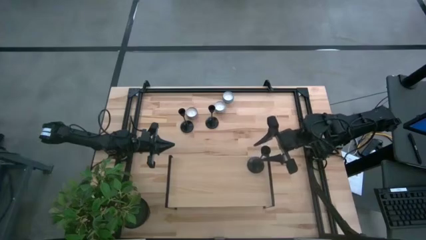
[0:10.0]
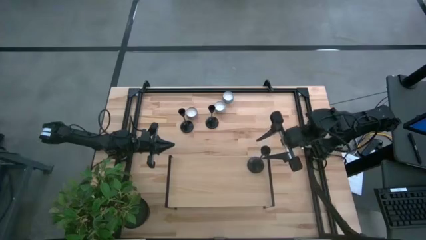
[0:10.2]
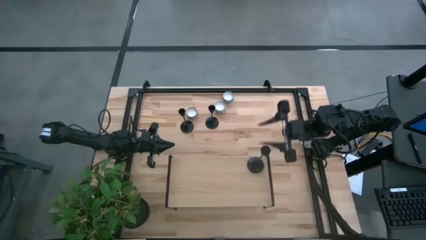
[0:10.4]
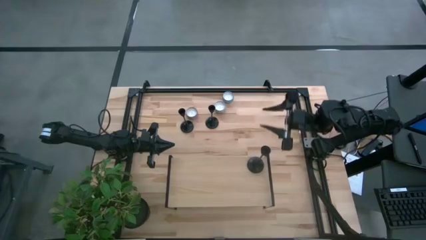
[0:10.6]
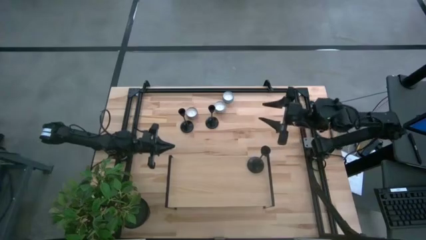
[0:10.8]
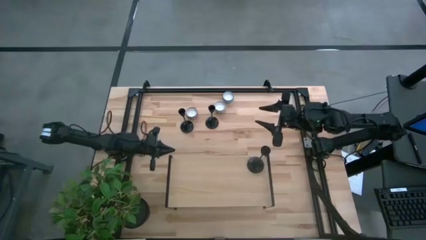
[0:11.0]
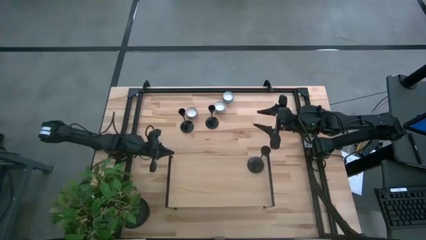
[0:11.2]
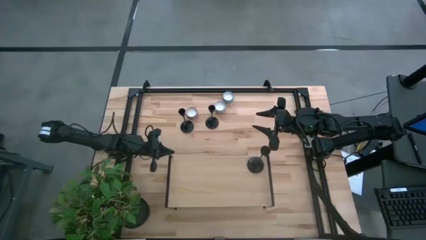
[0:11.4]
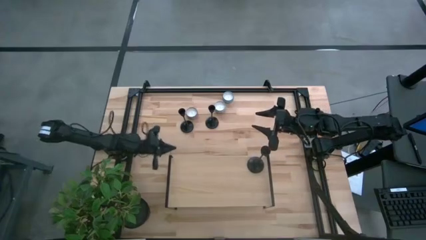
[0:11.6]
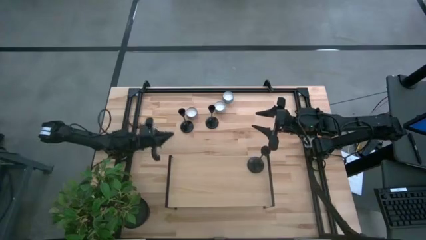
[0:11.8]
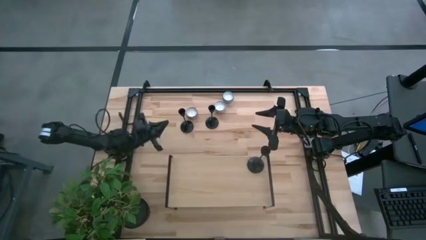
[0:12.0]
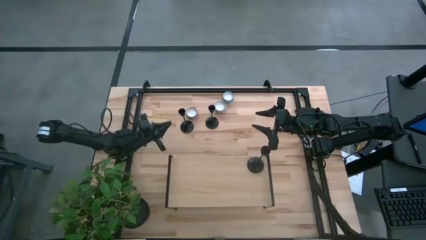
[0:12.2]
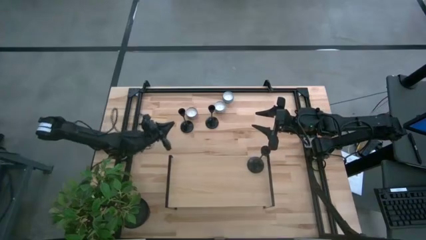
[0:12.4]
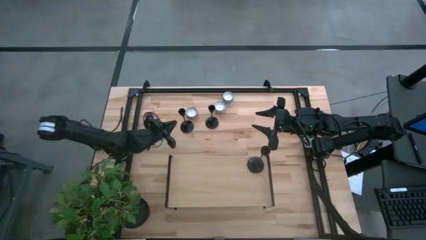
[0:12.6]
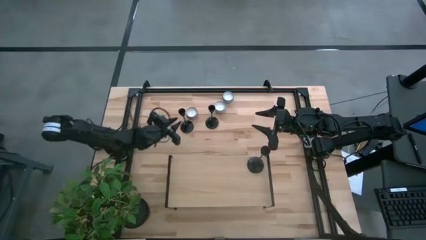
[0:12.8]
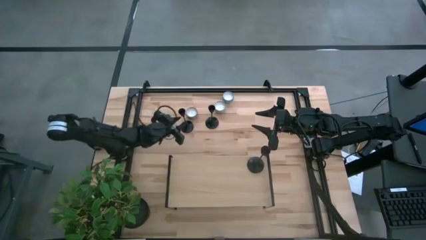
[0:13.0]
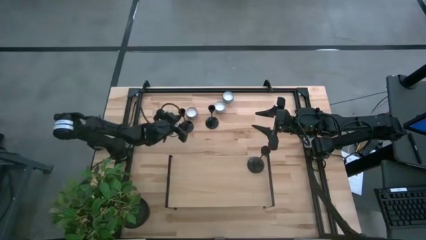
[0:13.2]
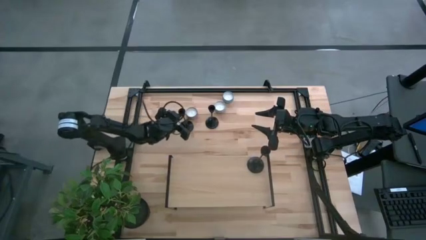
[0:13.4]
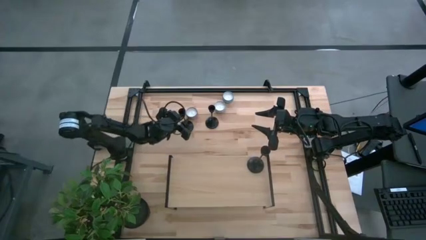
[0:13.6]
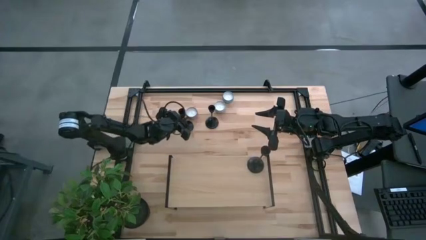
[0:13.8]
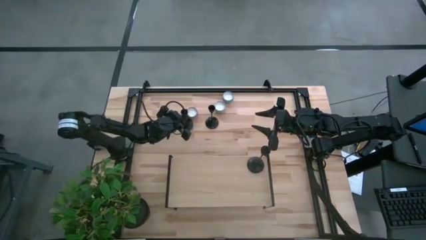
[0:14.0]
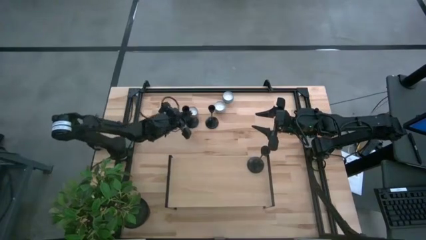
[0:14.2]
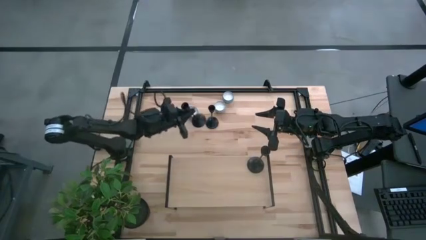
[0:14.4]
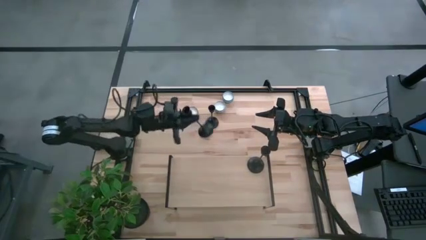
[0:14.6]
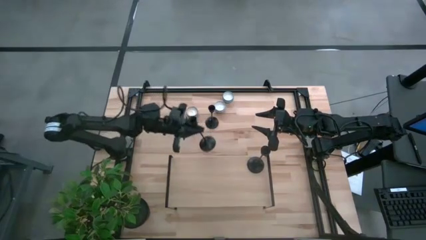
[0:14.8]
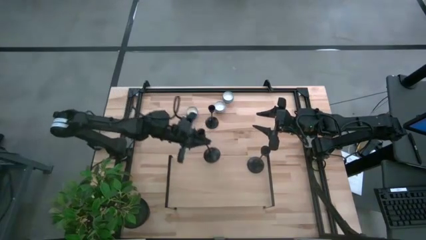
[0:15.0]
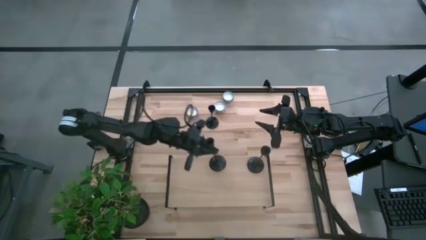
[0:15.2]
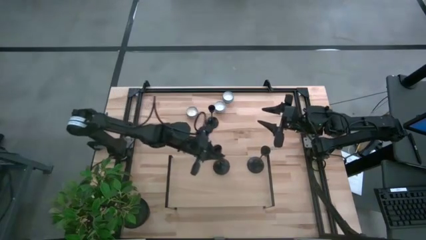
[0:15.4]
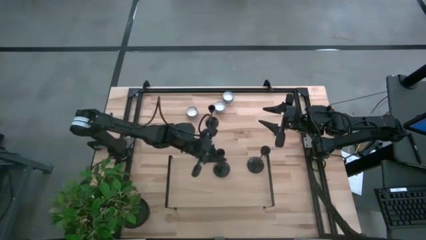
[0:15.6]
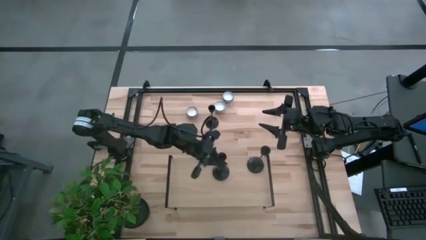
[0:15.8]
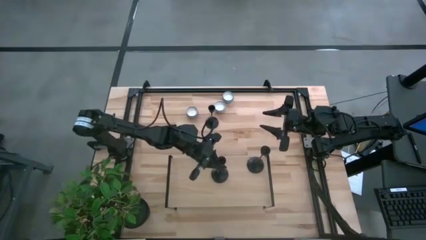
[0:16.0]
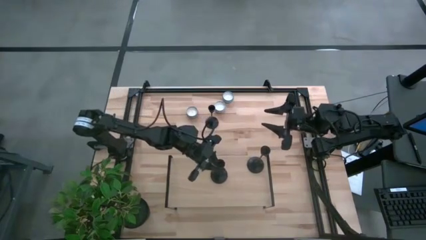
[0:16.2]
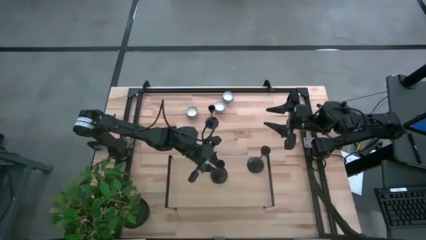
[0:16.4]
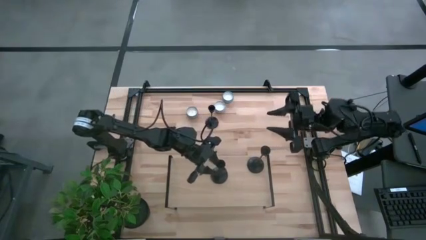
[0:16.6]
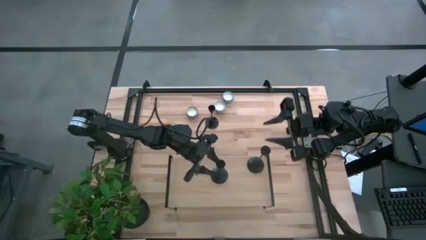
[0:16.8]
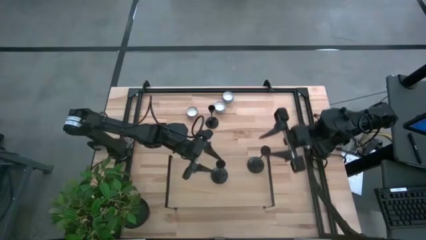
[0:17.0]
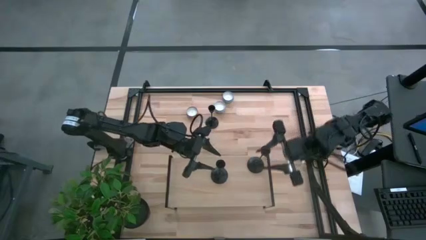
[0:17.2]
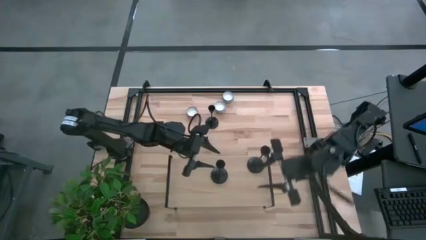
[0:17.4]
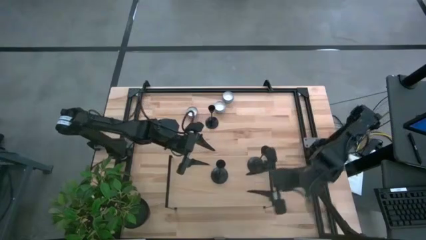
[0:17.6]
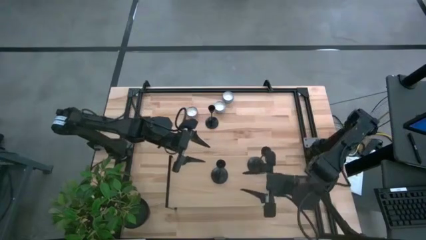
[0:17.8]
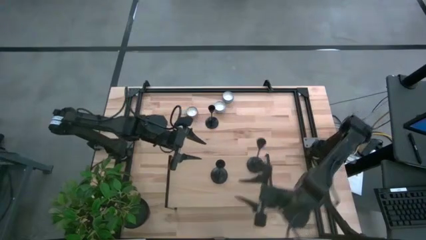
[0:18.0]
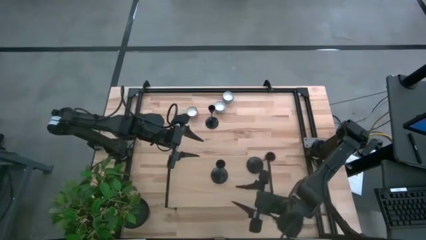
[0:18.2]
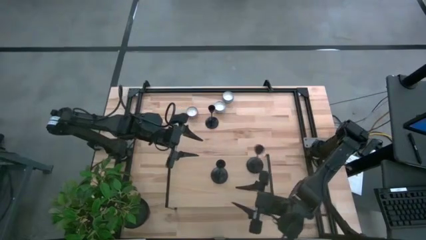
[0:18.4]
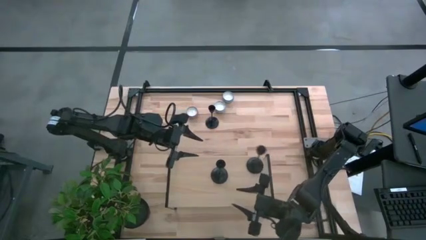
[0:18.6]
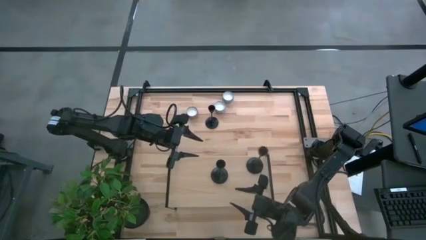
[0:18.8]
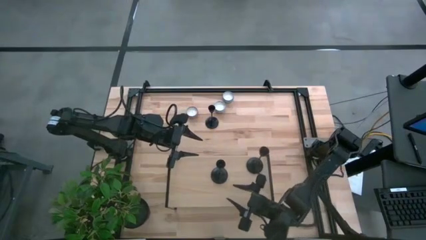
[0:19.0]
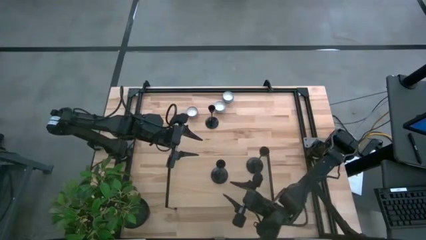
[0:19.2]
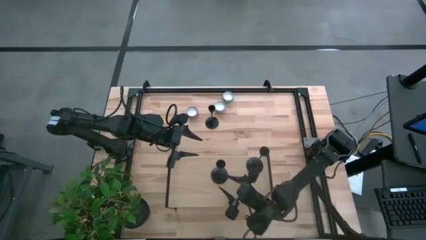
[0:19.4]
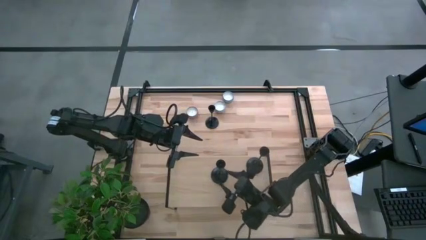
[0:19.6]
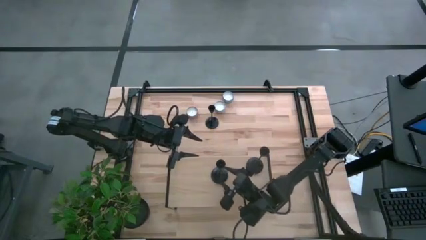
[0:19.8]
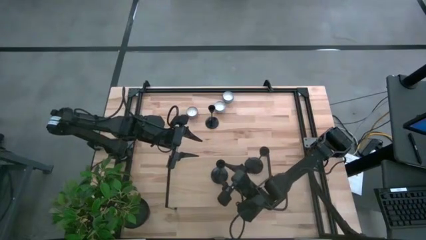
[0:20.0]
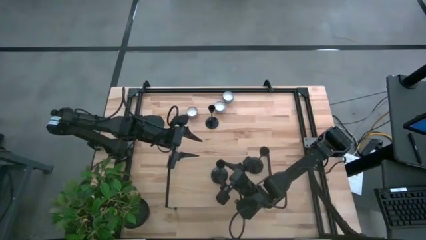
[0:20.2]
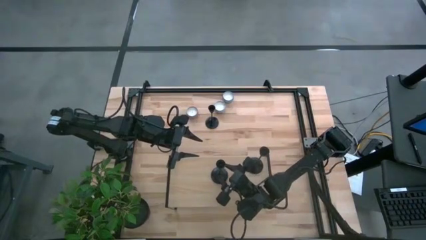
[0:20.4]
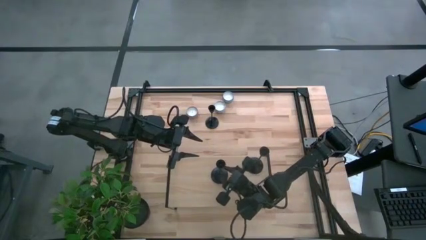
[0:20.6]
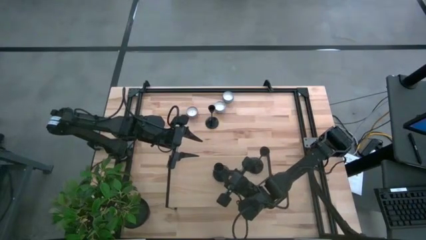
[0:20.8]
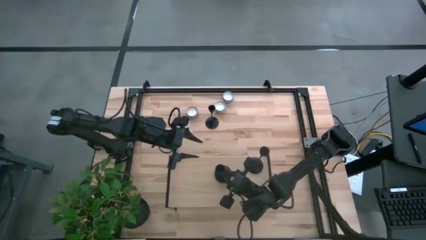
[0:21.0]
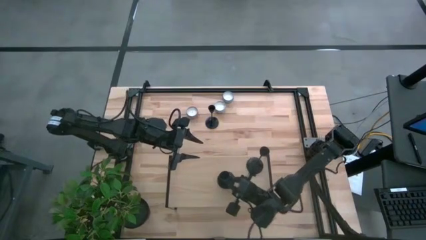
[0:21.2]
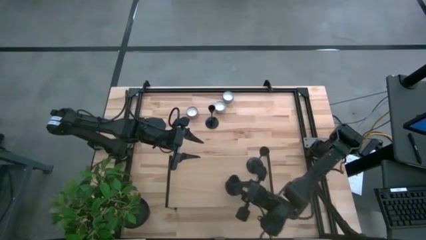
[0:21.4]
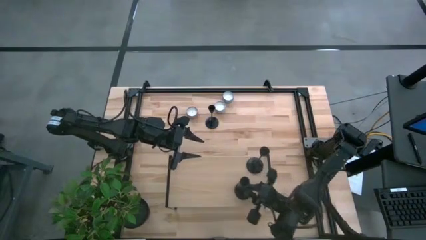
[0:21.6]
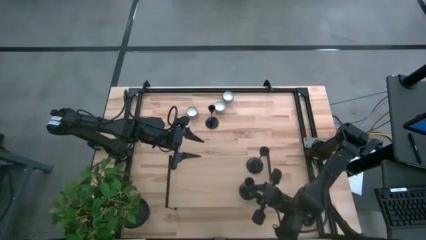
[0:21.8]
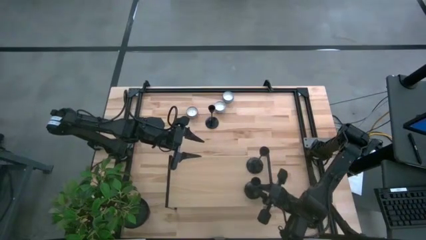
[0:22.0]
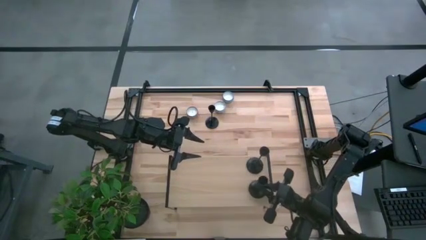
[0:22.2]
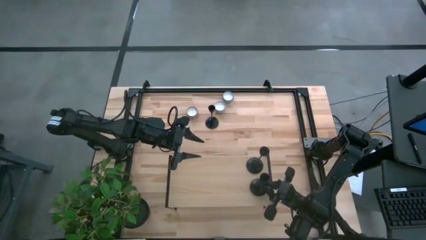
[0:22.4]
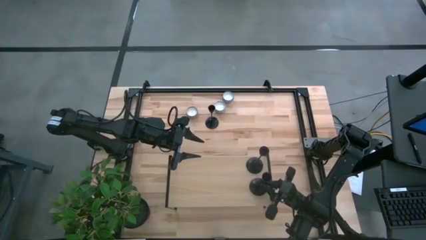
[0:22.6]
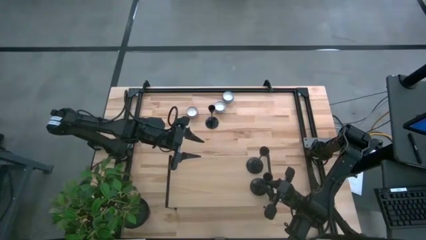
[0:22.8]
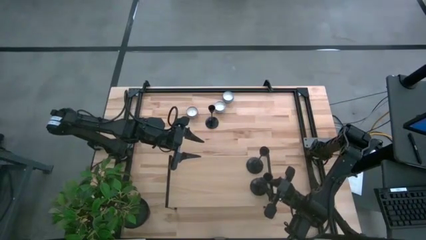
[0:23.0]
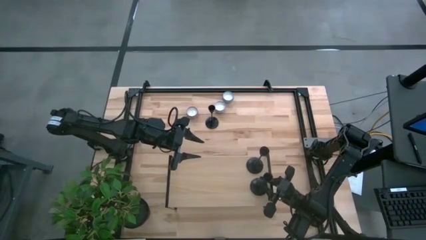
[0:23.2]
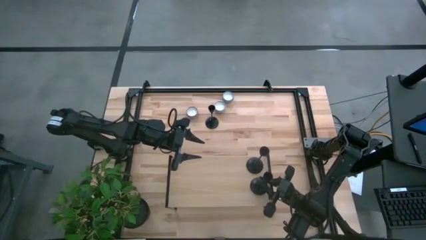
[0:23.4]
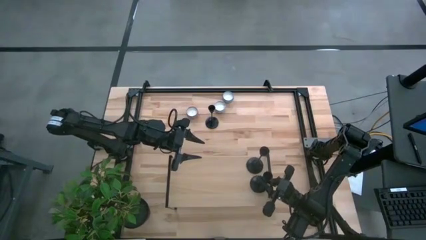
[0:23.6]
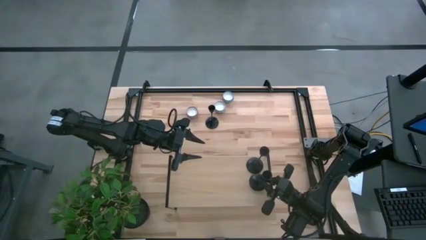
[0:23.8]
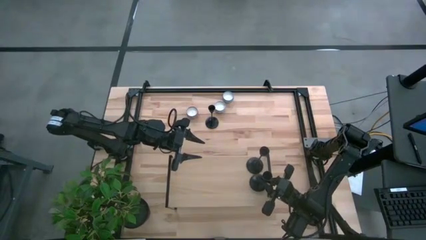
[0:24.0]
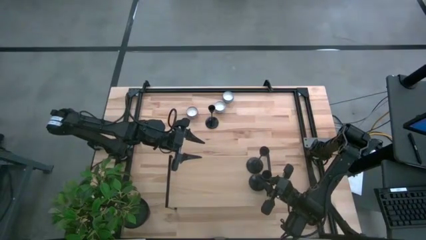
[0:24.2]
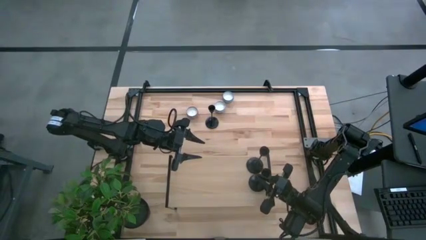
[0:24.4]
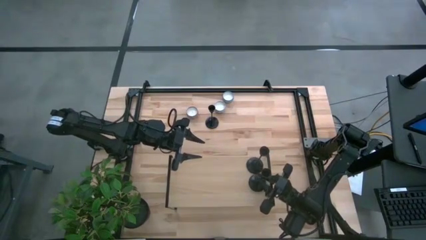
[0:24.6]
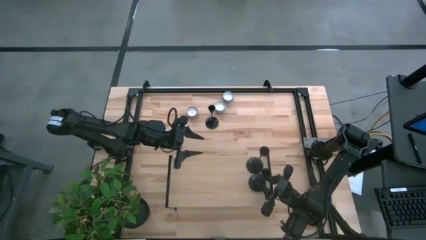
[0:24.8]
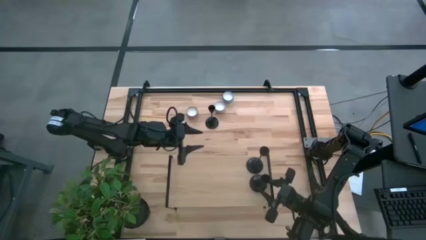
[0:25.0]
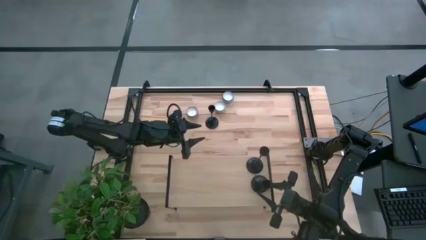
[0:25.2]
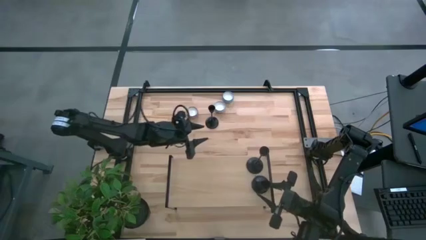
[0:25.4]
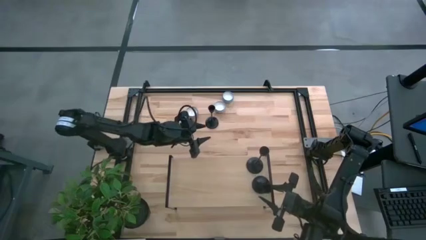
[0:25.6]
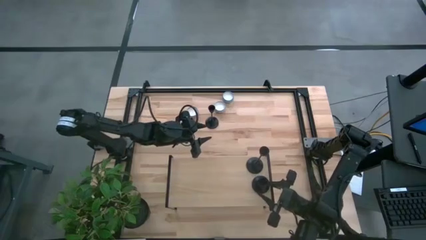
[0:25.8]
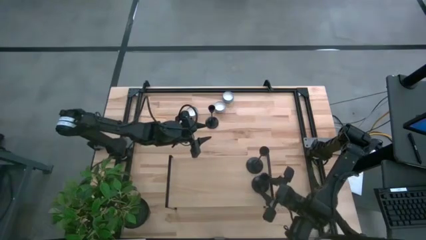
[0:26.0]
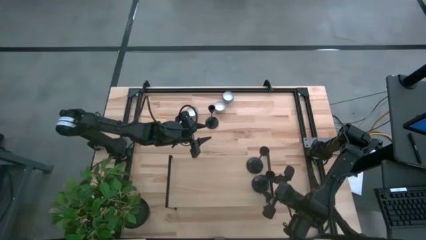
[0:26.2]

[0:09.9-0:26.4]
Task: Pick & Place candle stick holders
Put the left black candle holder on the shelf
